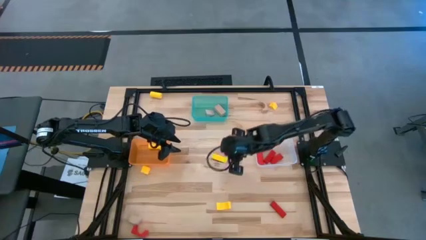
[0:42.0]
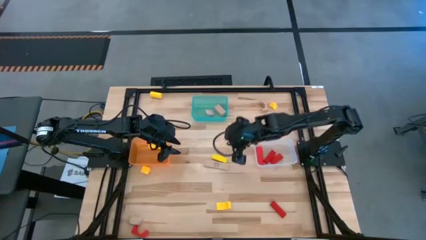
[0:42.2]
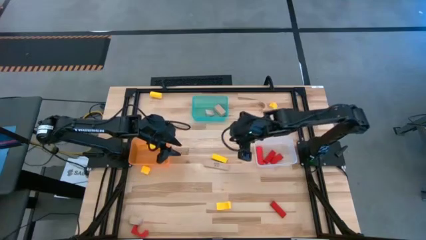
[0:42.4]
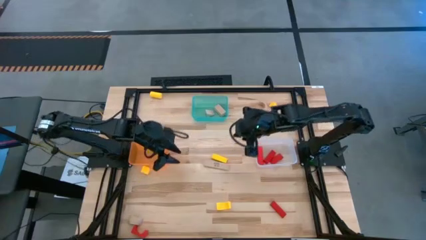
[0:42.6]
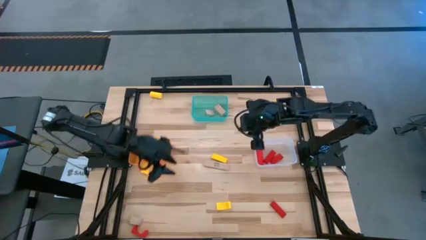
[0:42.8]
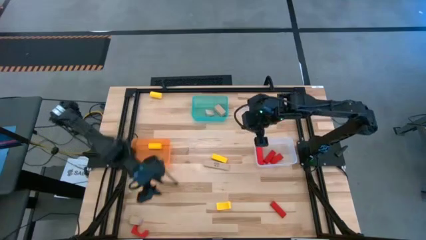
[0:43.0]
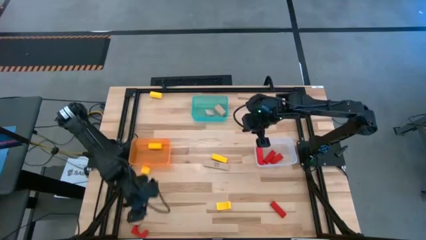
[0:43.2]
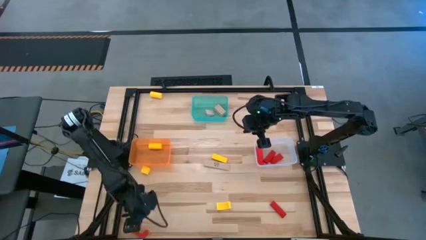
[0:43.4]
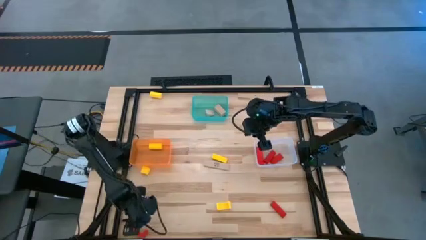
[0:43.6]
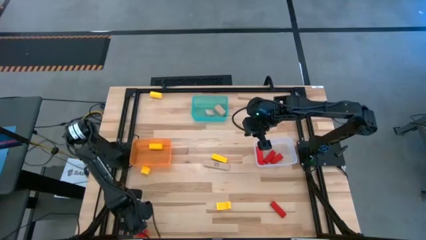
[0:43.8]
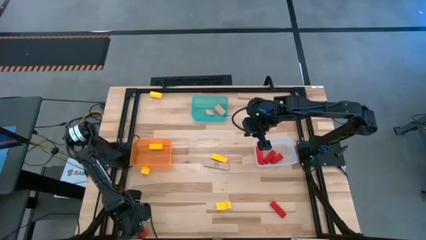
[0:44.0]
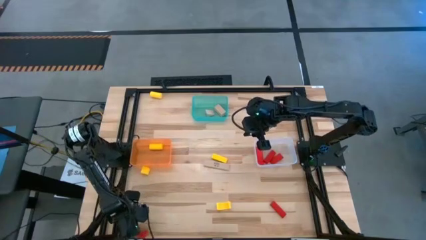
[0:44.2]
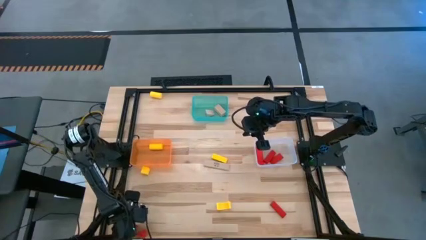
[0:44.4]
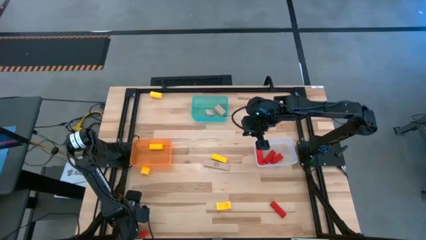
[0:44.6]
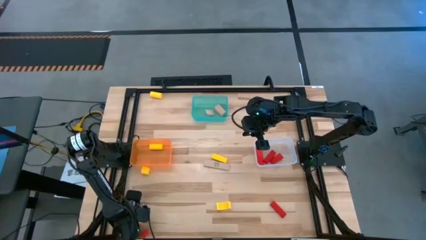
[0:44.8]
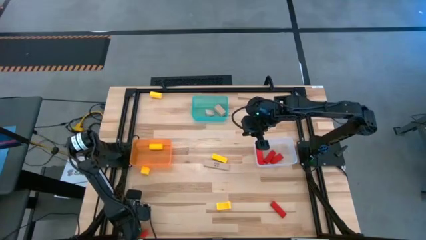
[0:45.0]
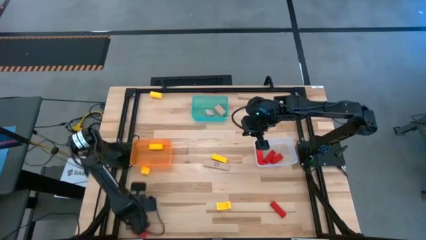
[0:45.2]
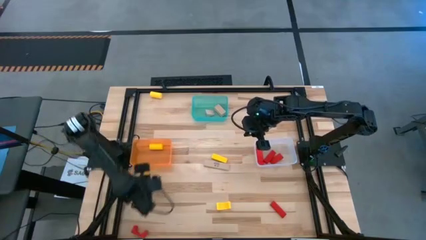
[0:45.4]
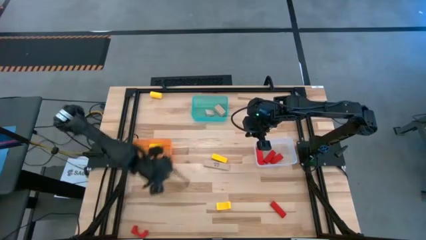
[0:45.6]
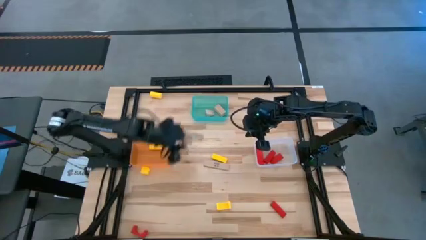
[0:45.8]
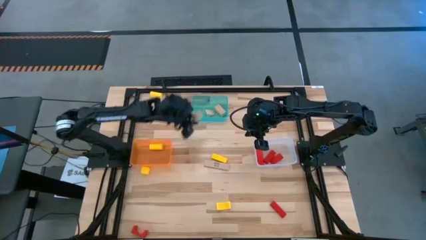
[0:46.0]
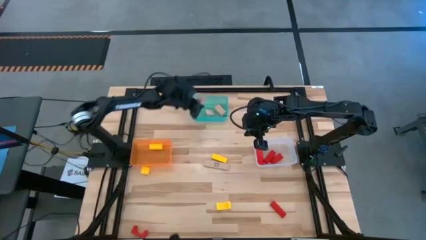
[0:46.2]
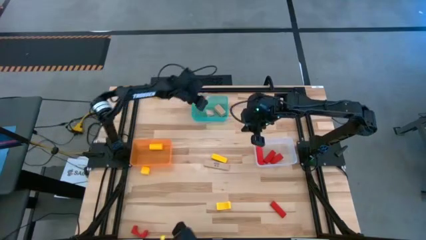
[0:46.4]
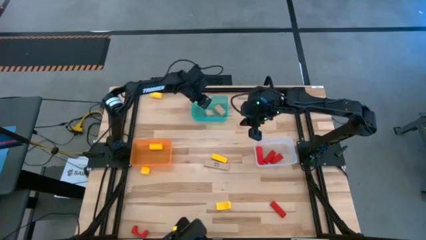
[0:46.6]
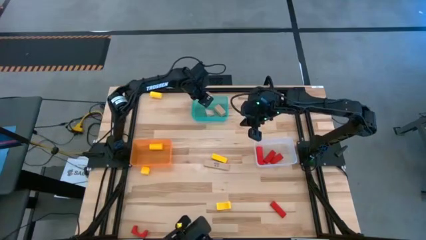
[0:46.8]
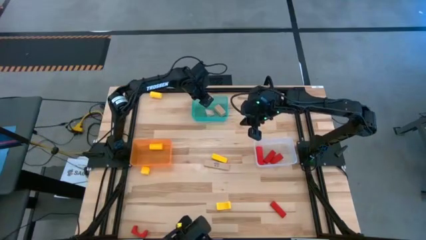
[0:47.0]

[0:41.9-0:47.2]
Task: Sort & place blocks by color
Put the brown block into the green bin

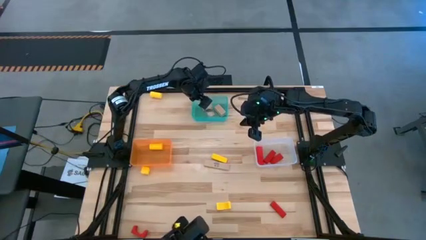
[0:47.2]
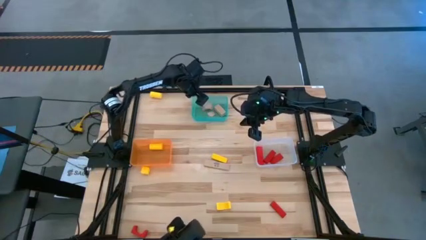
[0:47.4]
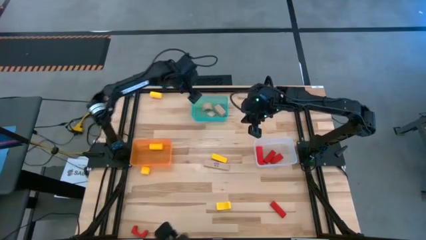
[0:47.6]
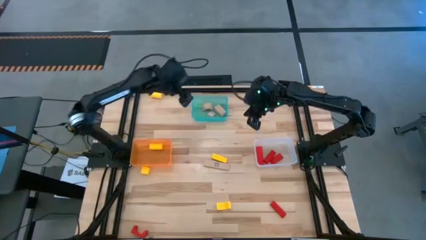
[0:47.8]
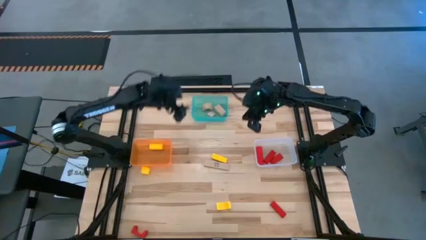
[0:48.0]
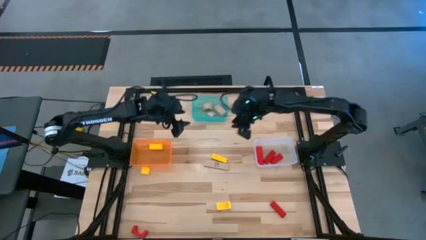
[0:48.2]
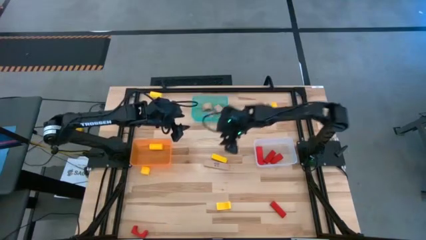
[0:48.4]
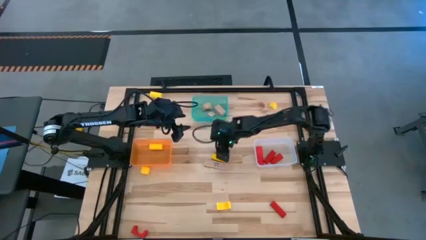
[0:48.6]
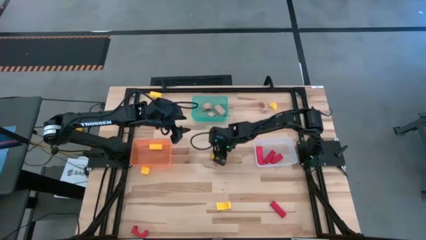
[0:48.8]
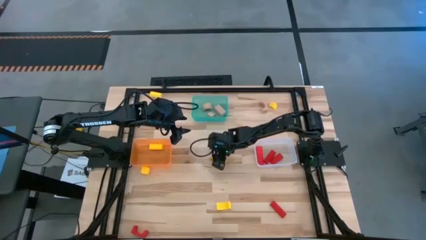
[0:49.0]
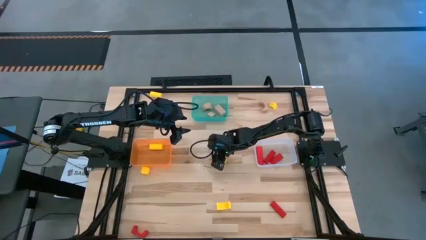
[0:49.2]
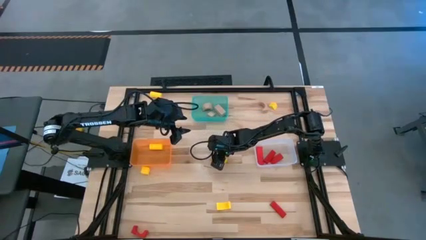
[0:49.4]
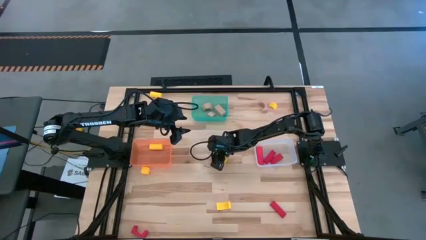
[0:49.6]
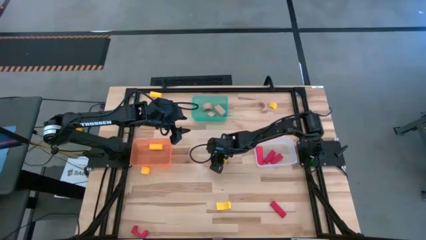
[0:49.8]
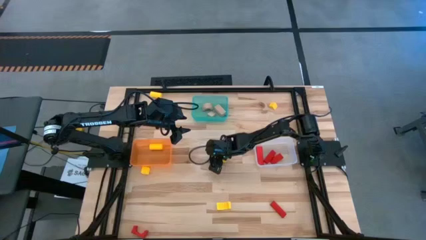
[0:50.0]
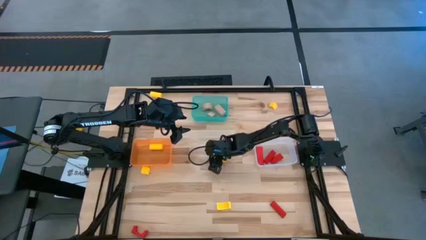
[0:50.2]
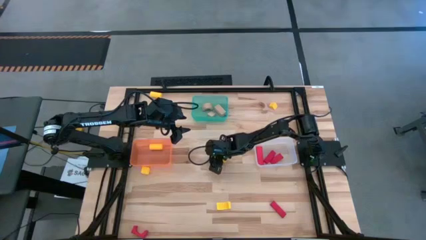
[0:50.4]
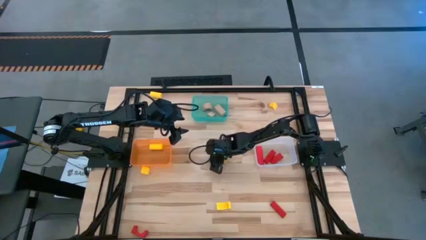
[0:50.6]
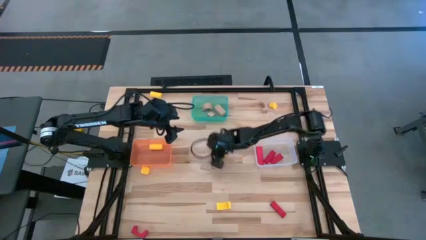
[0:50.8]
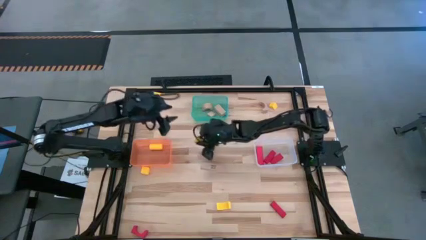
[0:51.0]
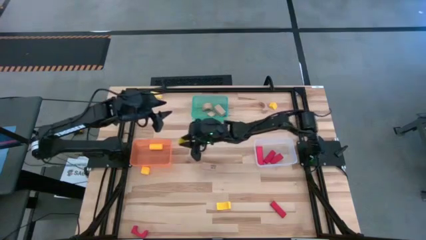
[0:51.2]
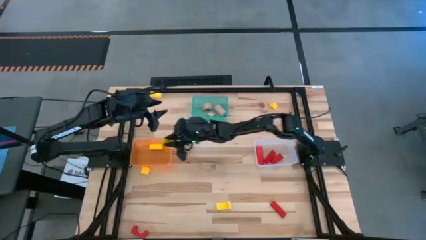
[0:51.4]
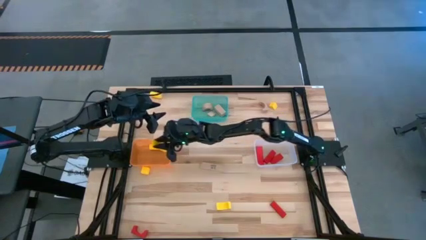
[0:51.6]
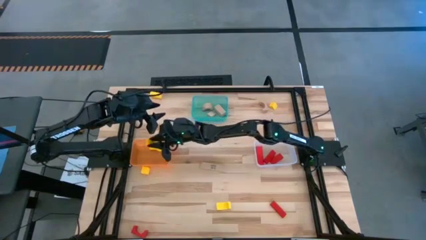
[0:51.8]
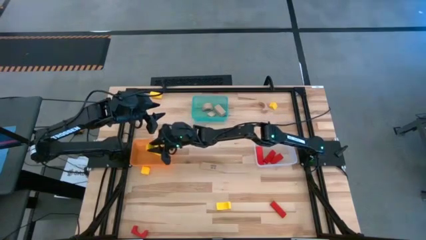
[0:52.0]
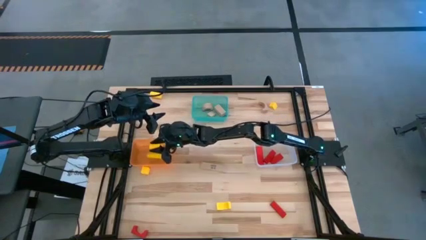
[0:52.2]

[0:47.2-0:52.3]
Put the yellow block into the orange bin

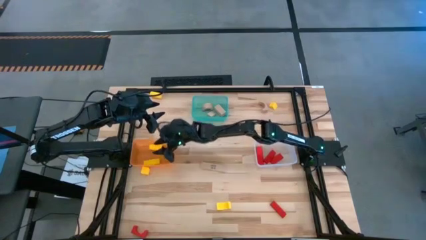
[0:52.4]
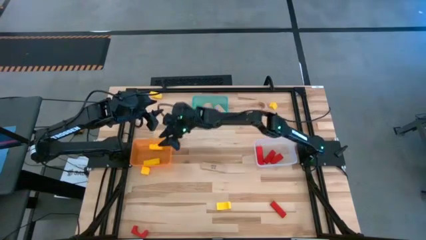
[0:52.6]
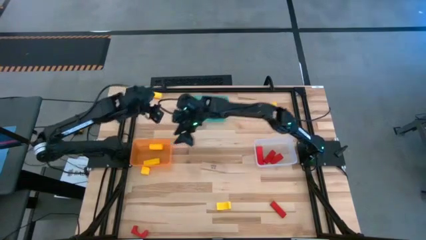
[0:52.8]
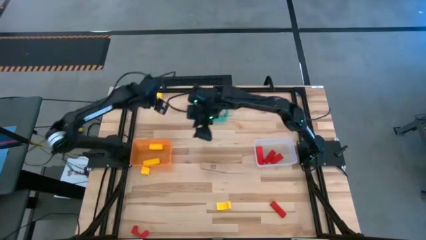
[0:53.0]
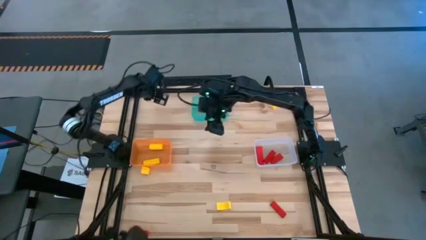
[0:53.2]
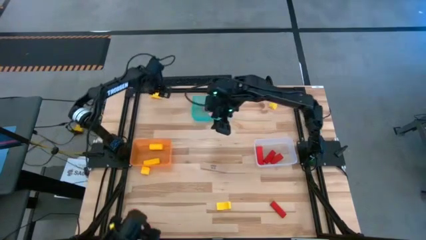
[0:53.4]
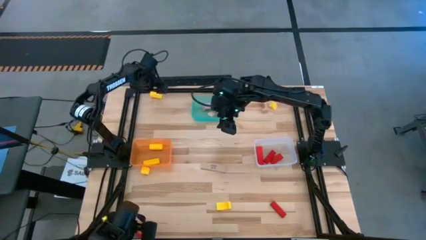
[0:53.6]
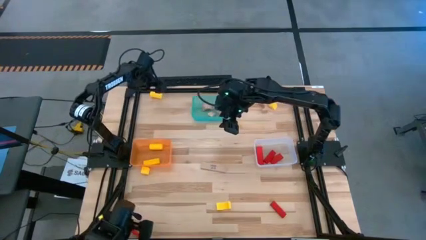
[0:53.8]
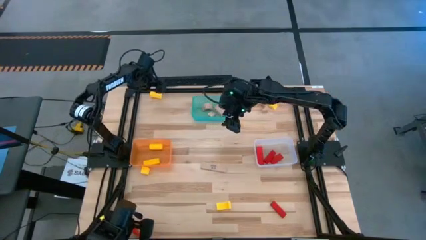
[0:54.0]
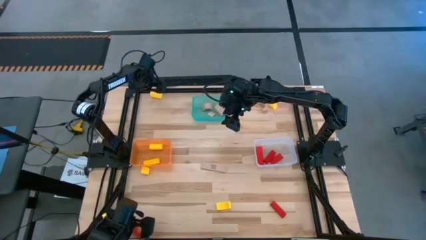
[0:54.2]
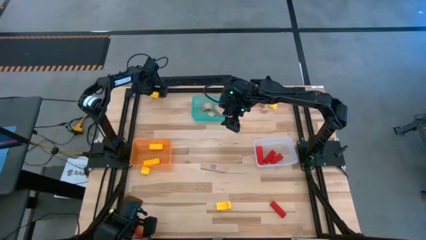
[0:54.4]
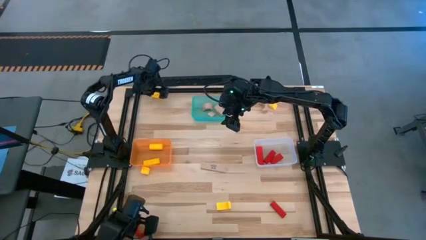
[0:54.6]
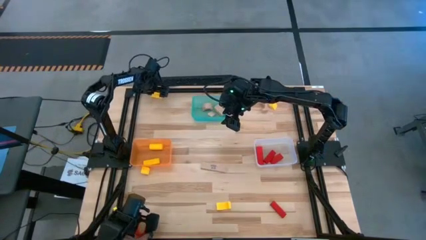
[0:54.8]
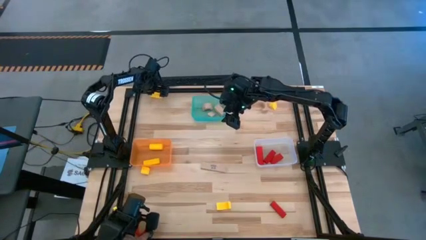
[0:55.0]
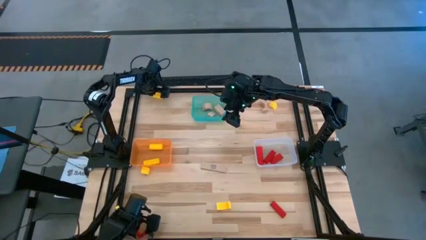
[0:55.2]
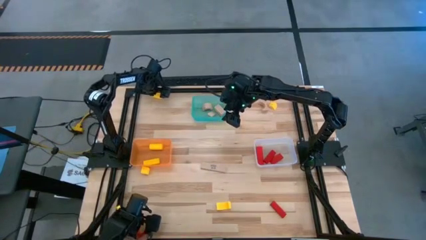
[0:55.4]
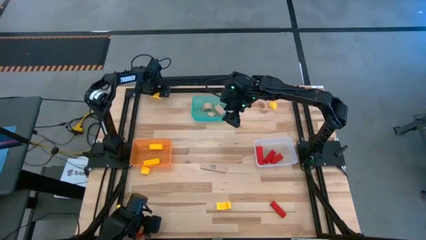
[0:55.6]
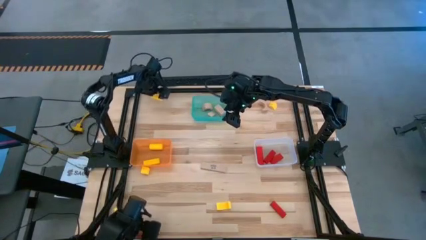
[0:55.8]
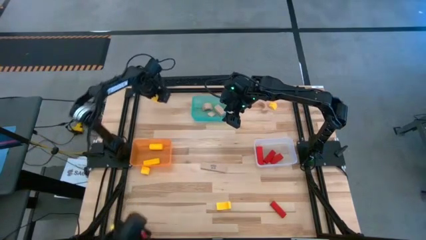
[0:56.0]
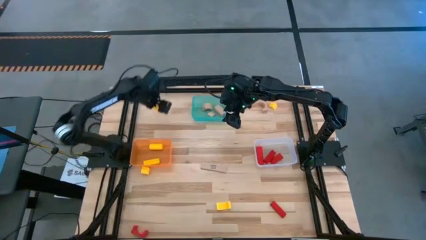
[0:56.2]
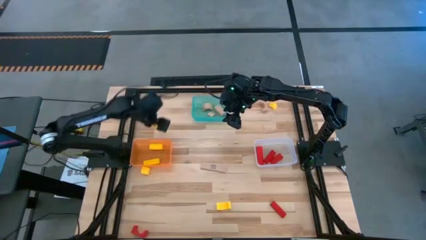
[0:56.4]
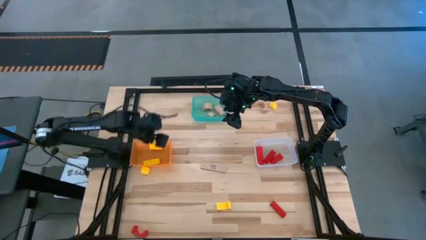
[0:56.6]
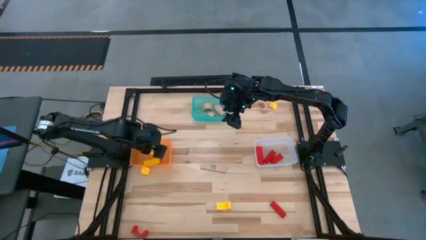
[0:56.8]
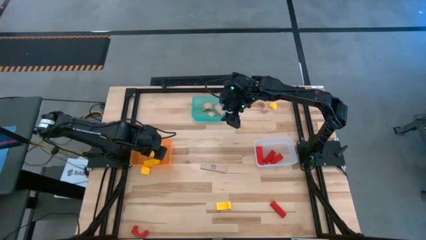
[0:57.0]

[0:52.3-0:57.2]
Put the yellow block into the orange bin

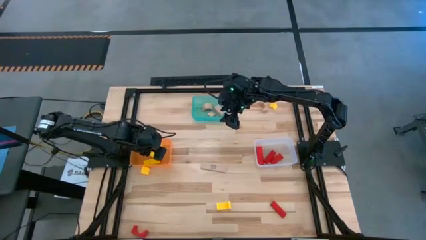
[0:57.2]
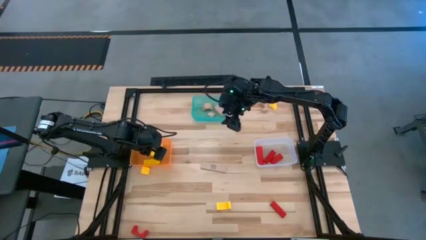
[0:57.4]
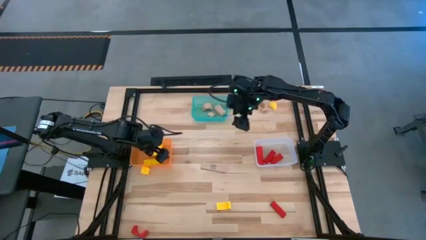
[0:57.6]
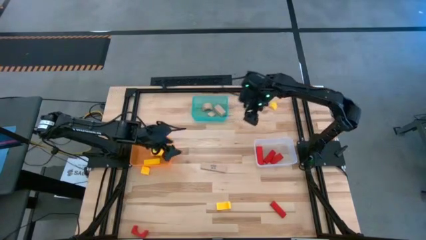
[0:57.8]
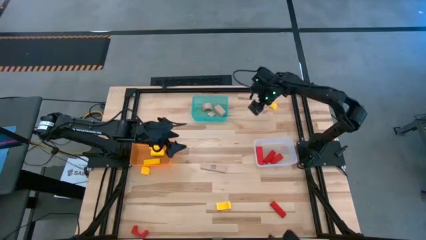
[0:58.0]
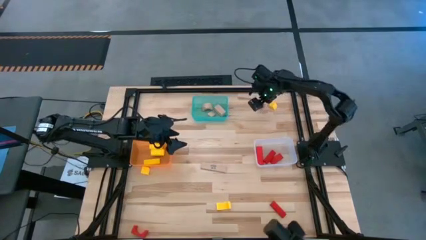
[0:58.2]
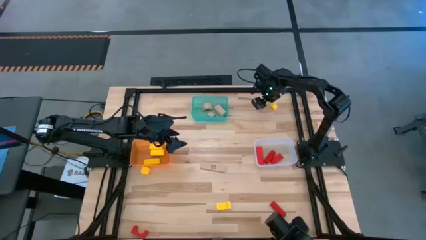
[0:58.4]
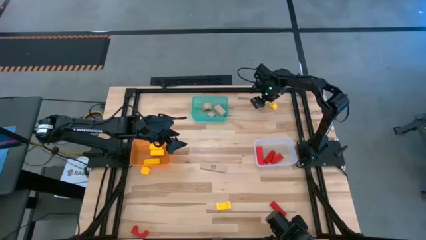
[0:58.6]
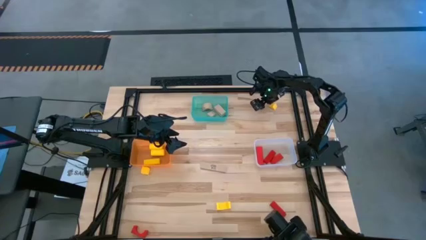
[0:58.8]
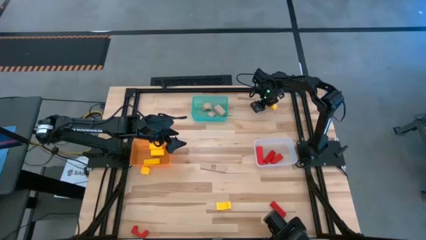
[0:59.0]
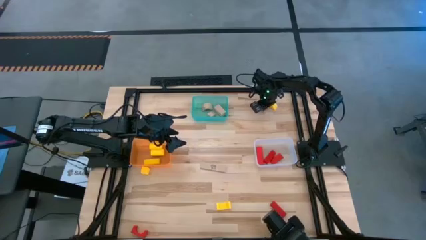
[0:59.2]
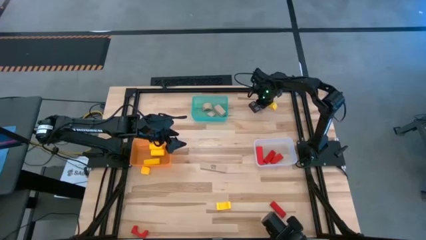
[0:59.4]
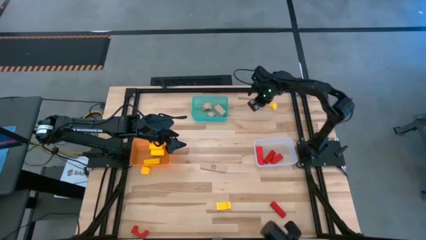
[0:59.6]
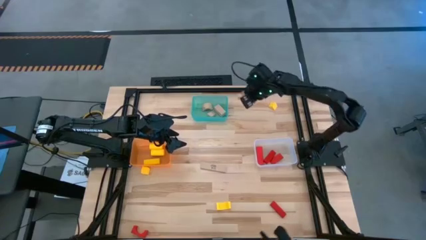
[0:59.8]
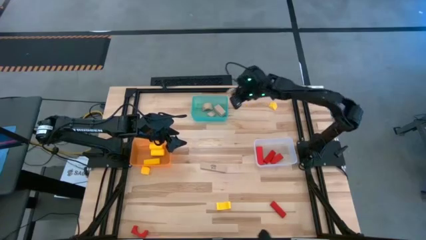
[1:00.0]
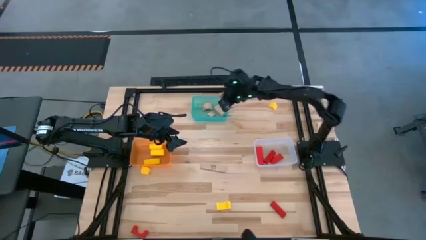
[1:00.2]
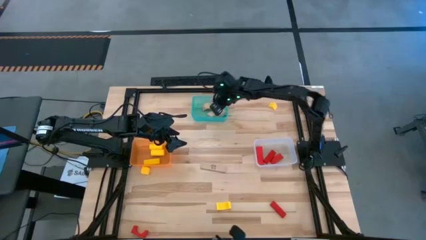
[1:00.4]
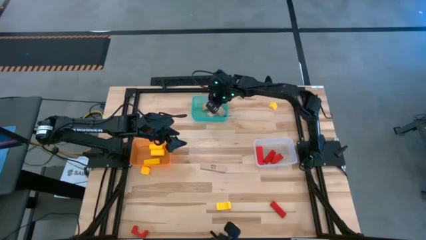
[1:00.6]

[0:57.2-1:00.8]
Put the brown block into the green bin
